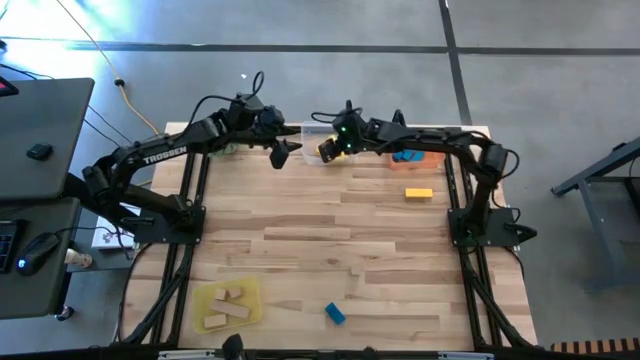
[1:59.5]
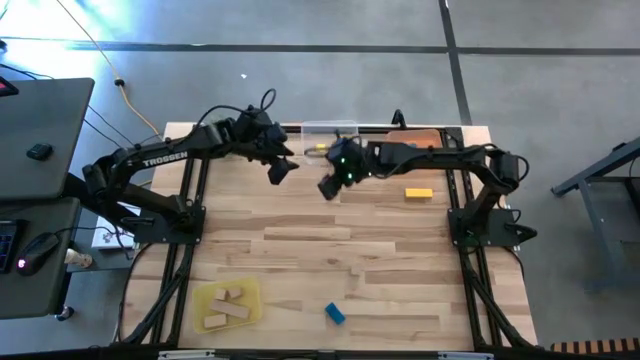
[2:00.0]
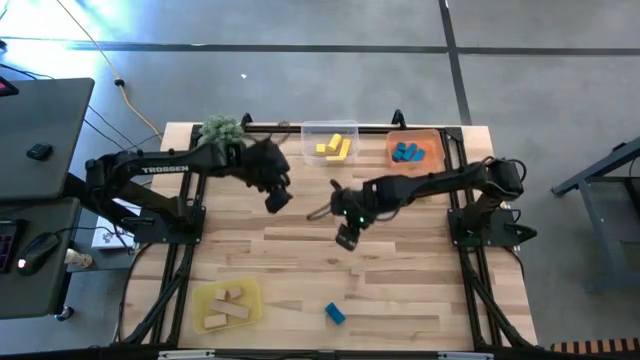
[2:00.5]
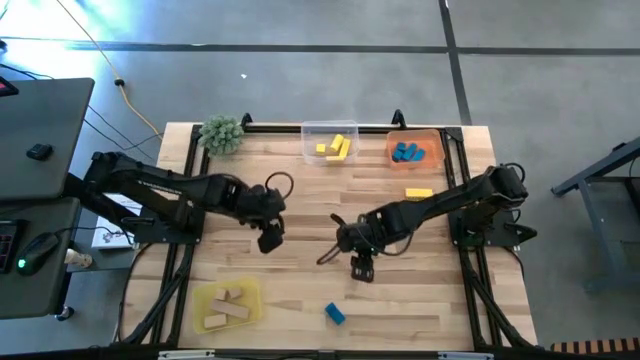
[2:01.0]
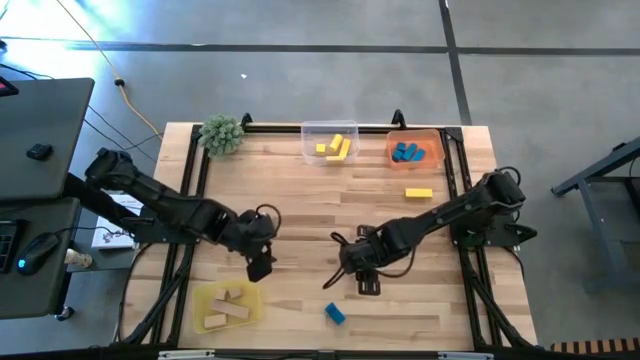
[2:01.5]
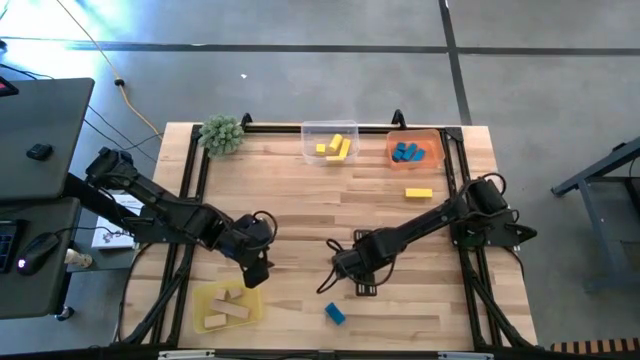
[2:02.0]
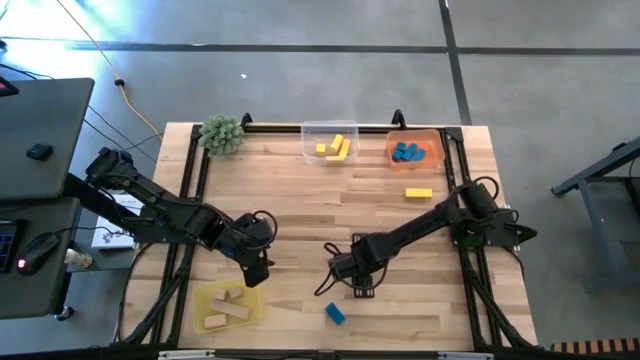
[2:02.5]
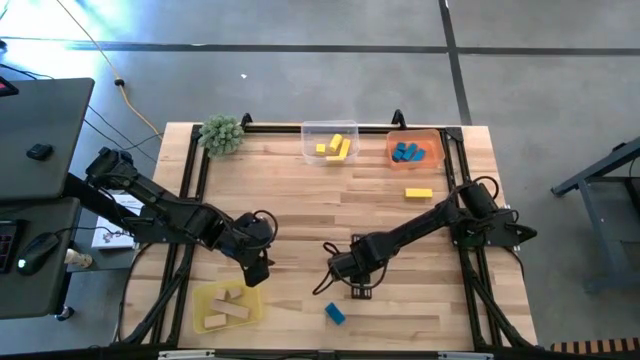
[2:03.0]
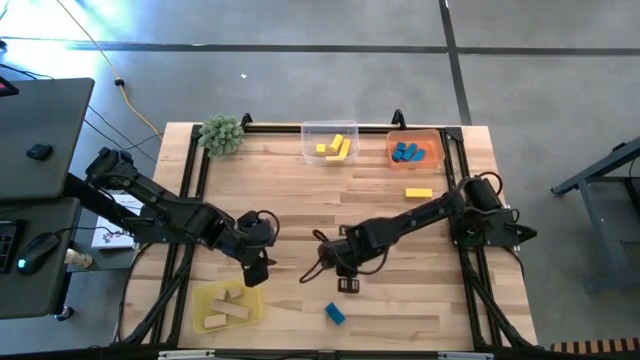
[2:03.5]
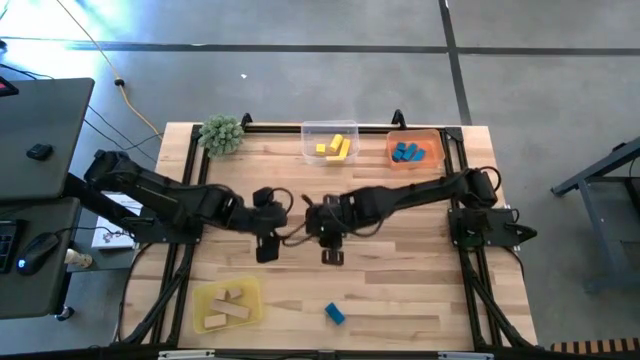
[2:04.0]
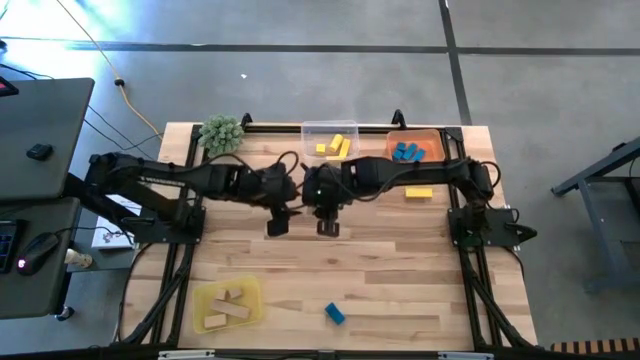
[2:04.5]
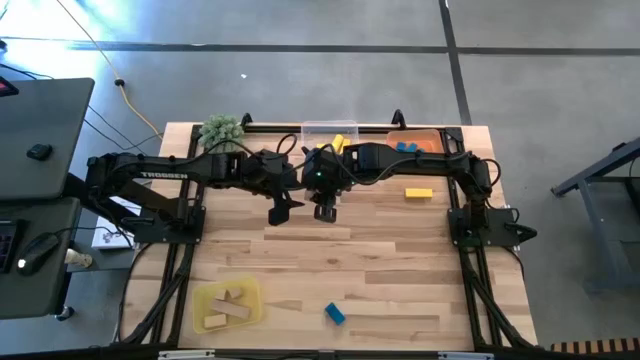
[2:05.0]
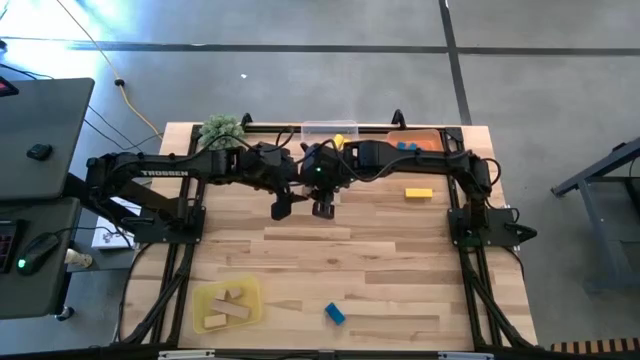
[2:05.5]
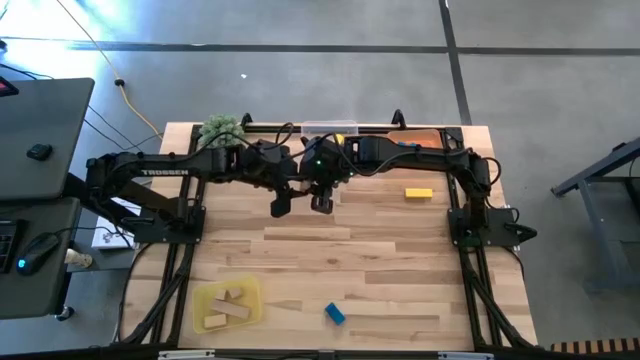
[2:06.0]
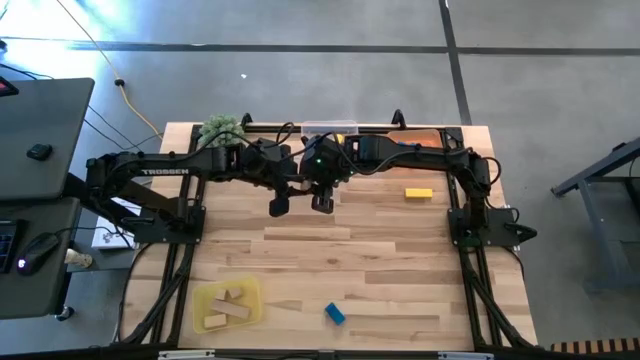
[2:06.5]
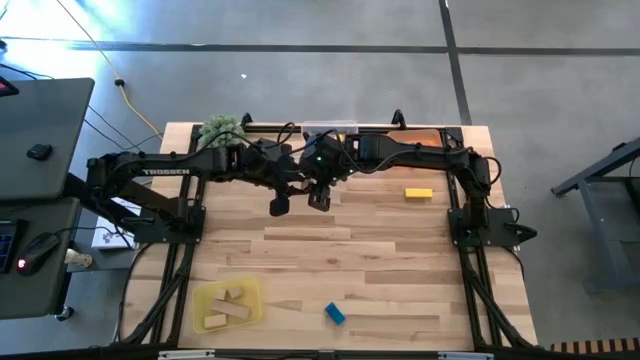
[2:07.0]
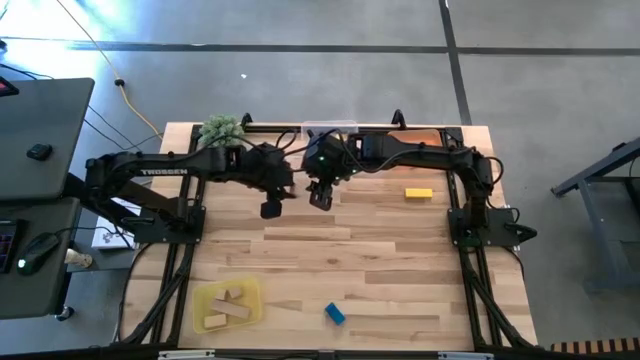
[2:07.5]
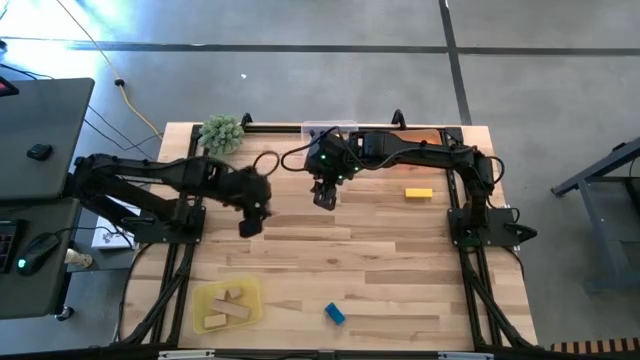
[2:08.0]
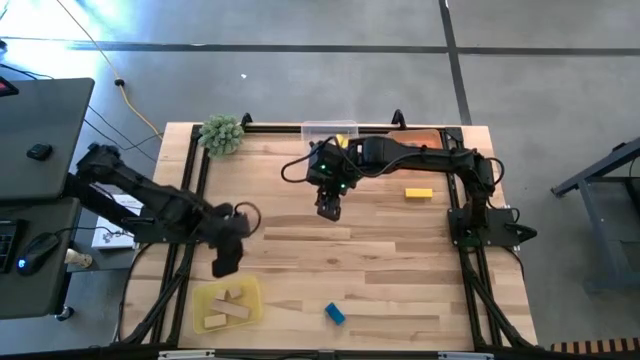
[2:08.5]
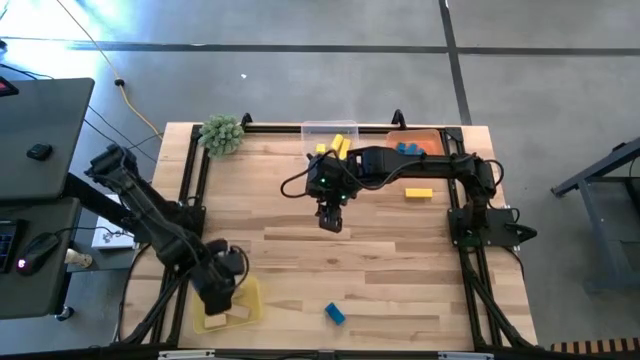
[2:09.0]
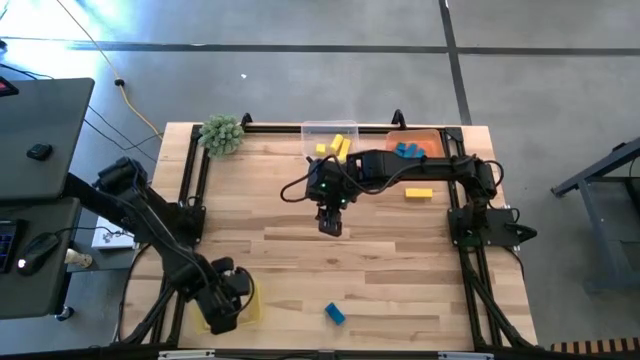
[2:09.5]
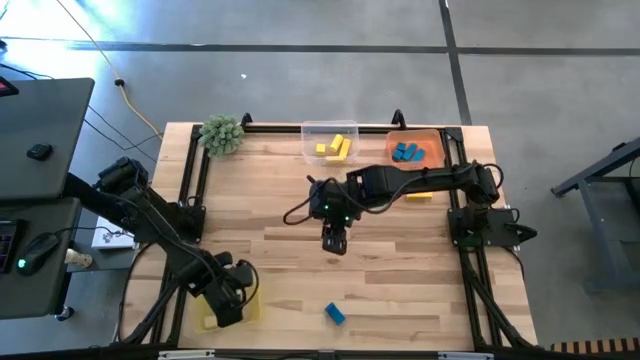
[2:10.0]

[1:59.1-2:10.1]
Task: Sort & place blocks by color
Put the brown block into the yellow bin

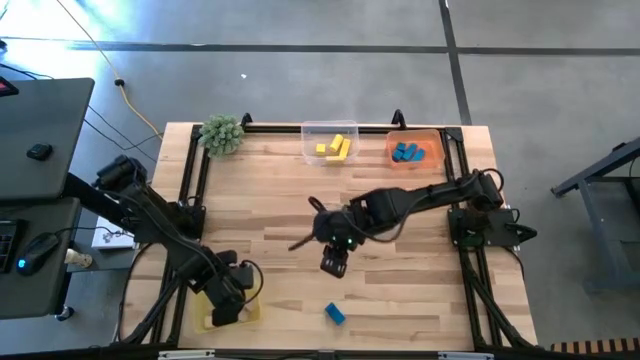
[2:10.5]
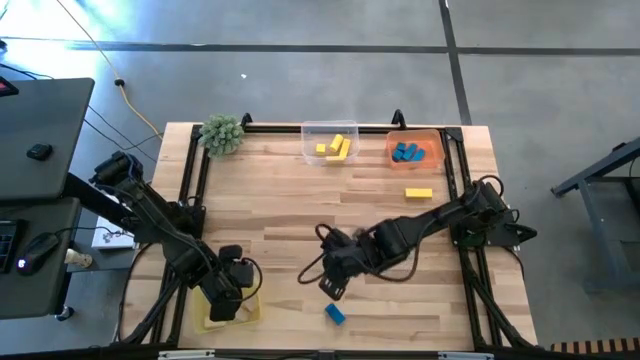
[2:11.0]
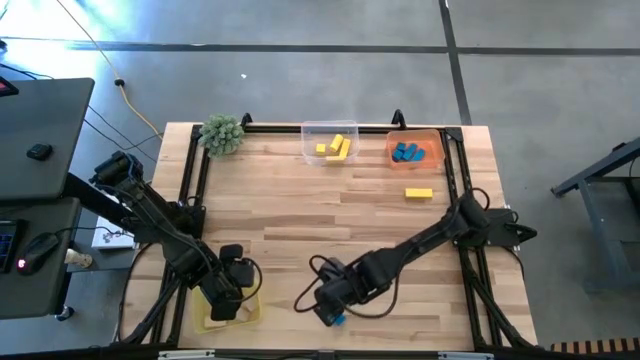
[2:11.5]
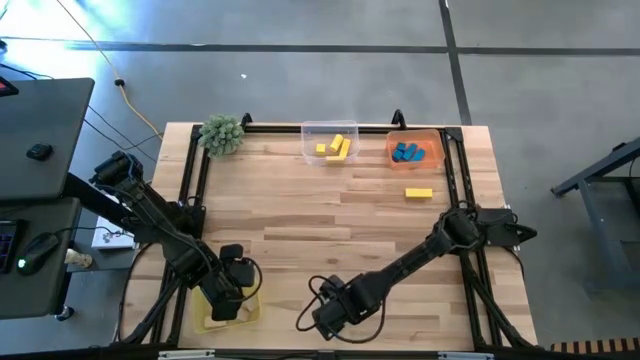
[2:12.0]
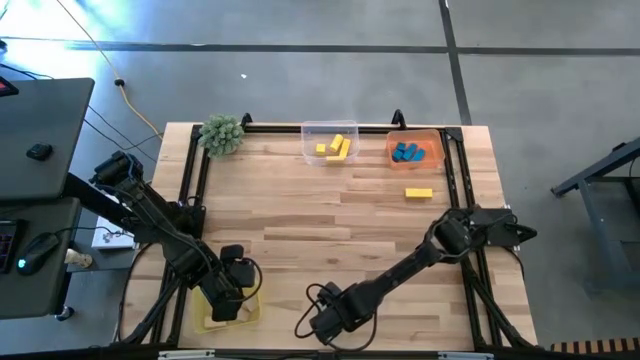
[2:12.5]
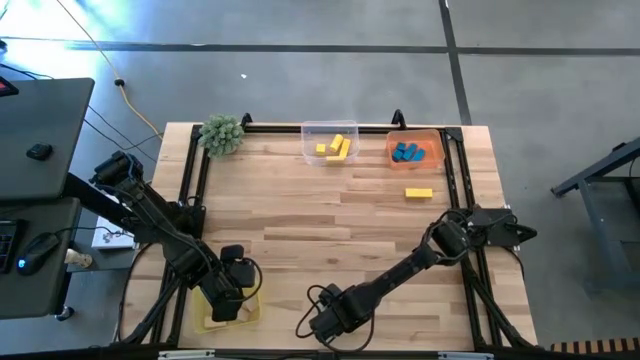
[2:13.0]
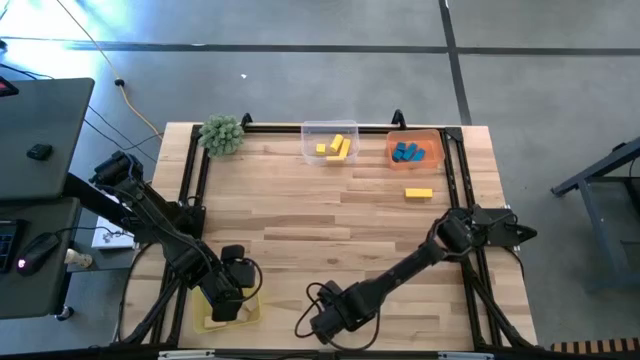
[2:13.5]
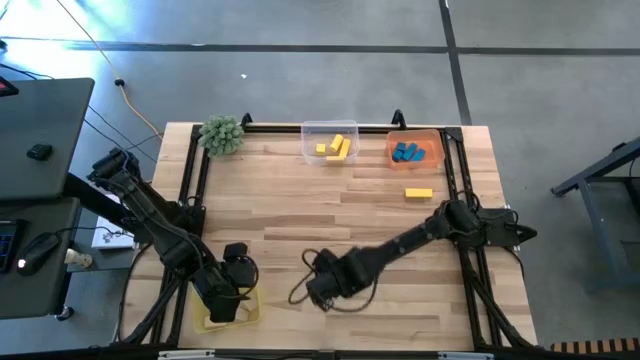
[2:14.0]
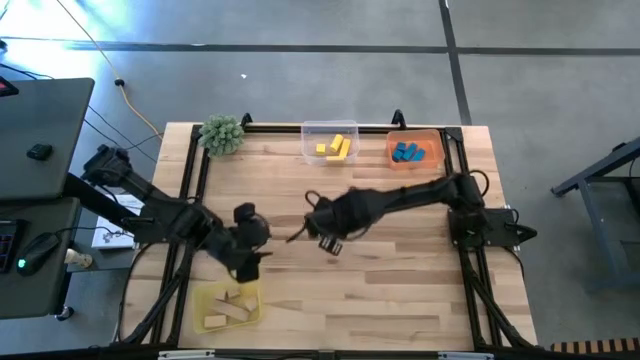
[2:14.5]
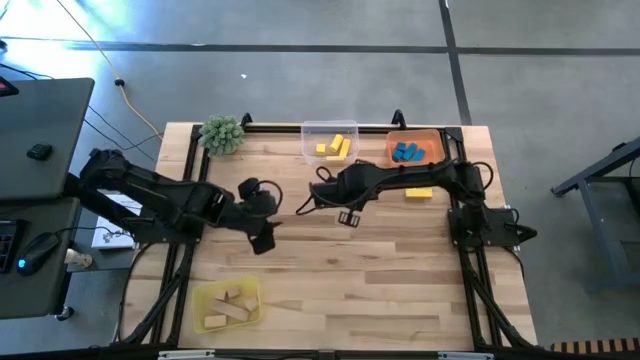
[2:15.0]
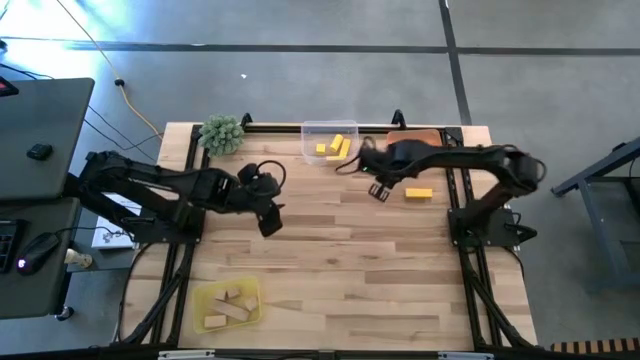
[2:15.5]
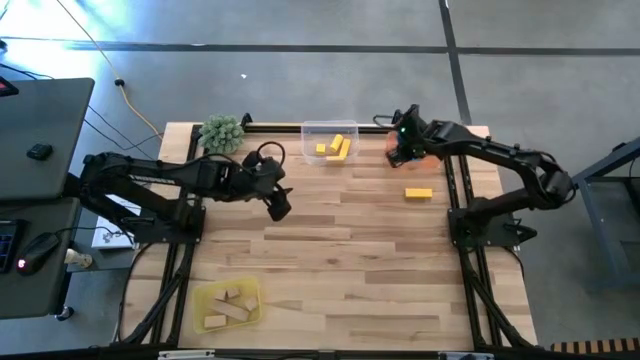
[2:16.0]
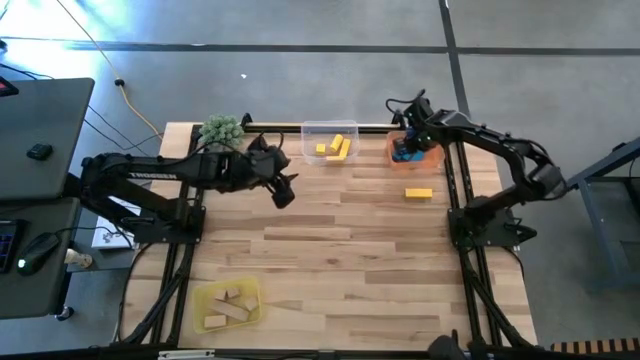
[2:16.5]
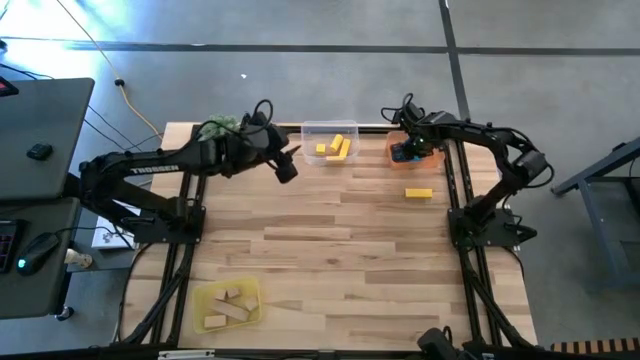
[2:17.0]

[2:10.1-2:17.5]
Put the blue block into the orange bin

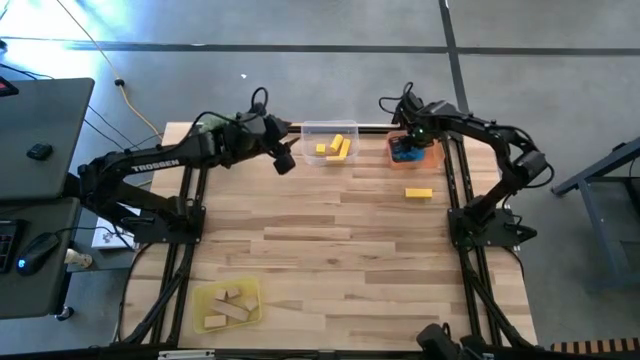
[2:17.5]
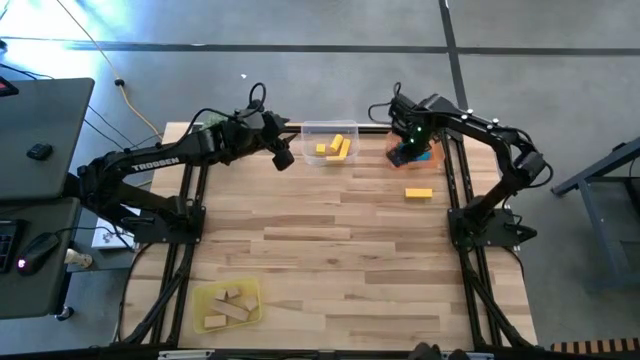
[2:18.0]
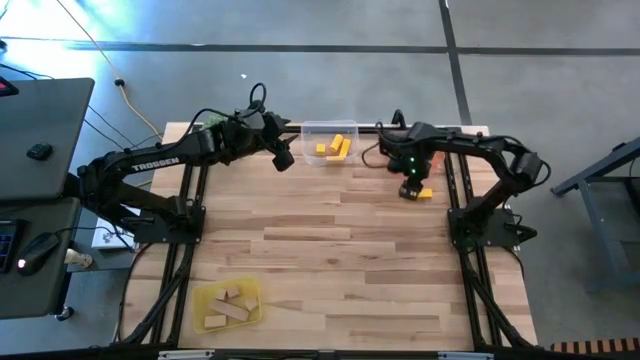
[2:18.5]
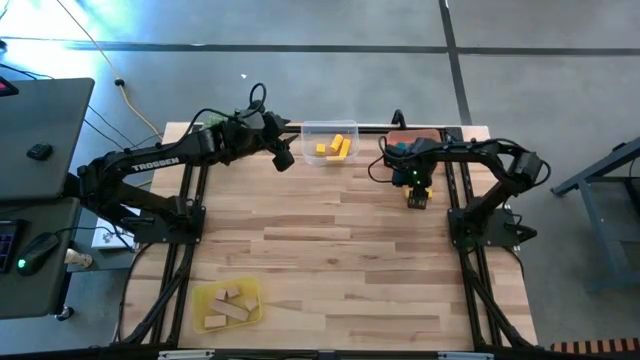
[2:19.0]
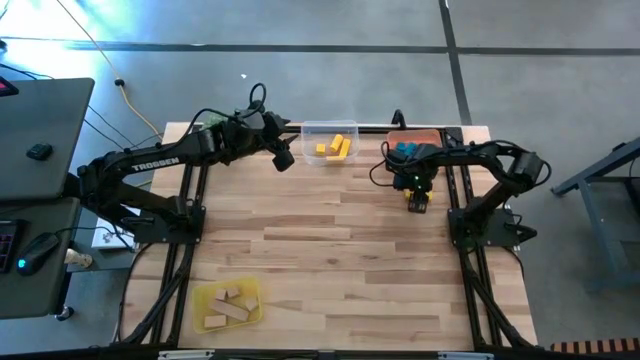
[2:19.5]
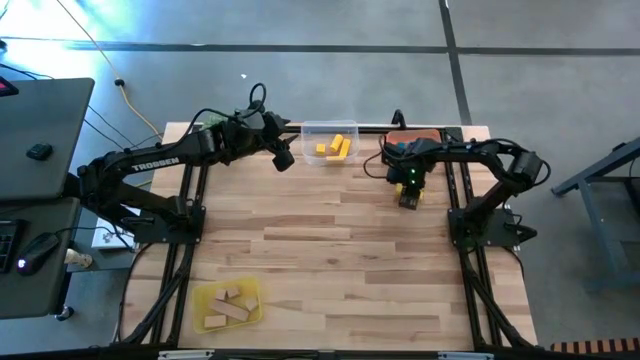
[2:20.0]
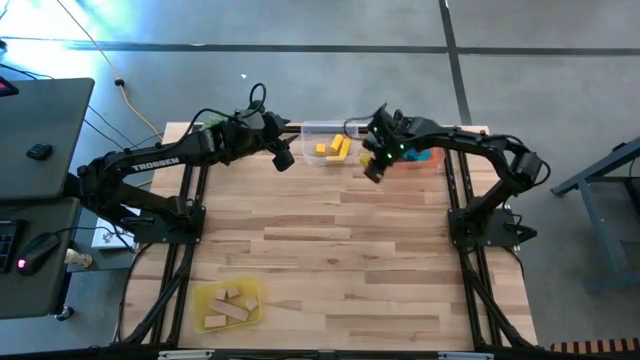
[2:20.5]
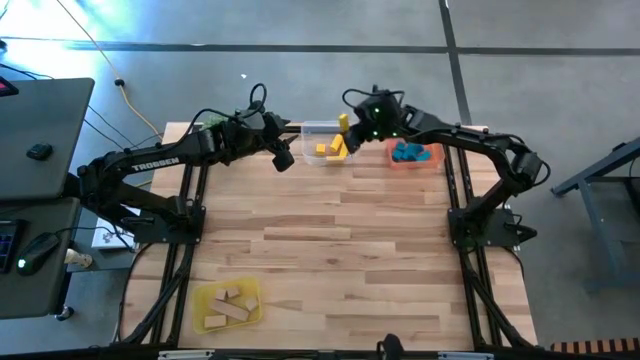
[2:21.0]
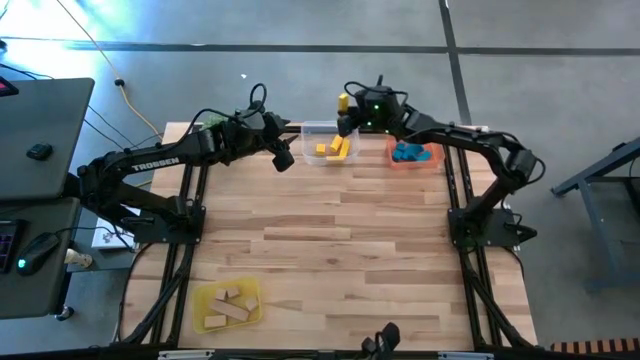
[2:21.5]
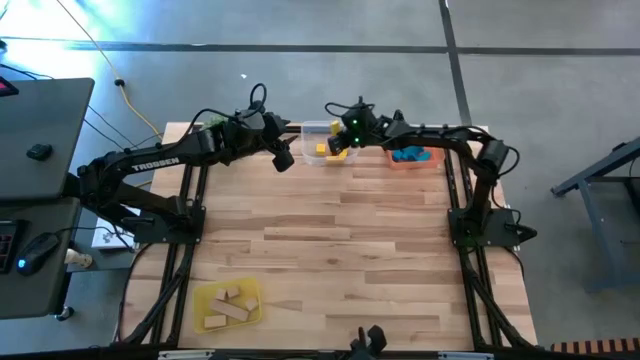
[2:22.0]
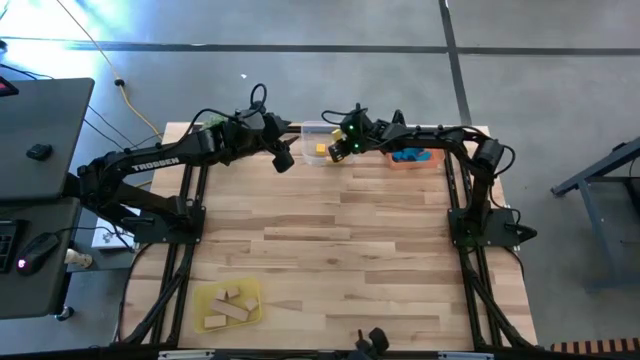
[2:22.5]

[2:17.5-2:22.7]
Put the yellow block into the transparent bin
